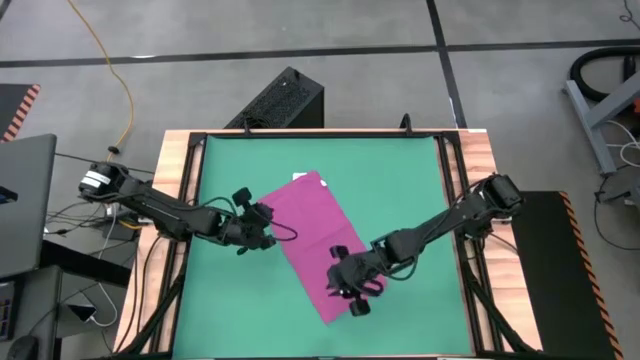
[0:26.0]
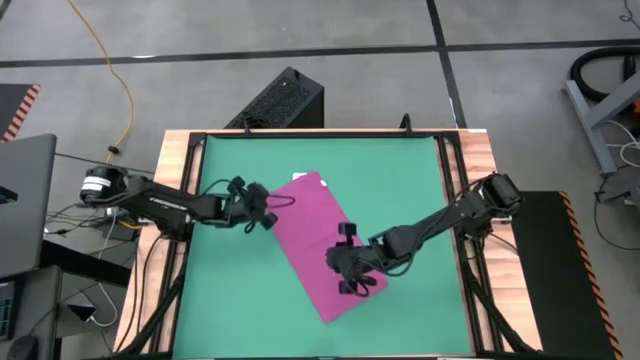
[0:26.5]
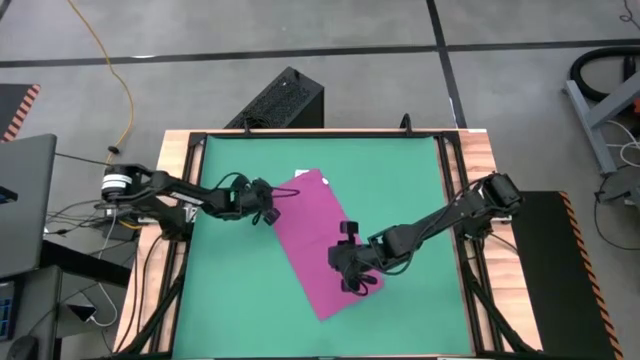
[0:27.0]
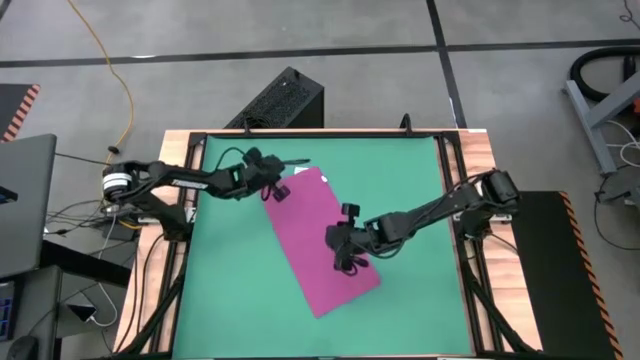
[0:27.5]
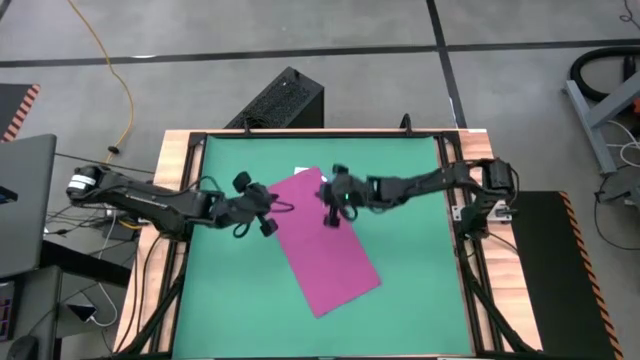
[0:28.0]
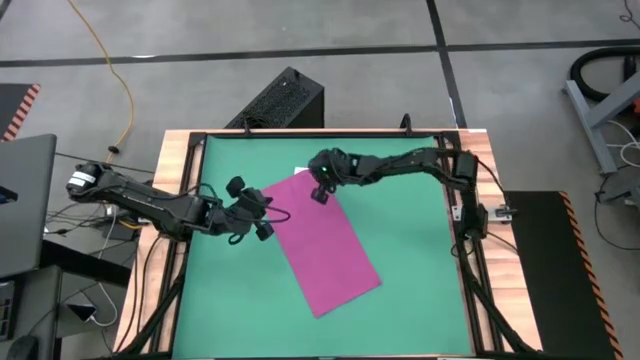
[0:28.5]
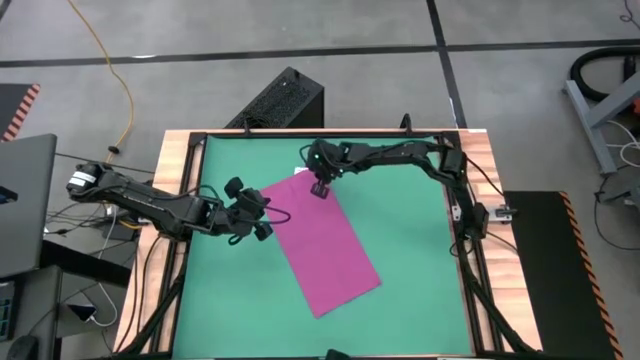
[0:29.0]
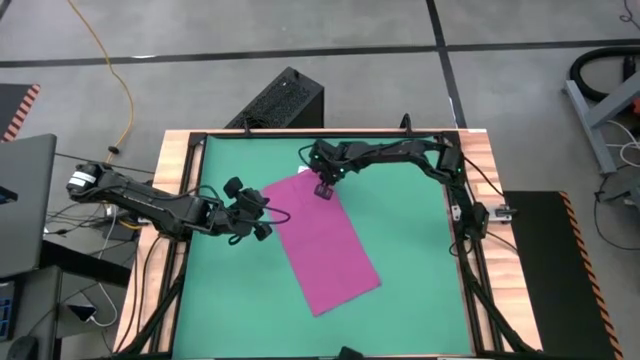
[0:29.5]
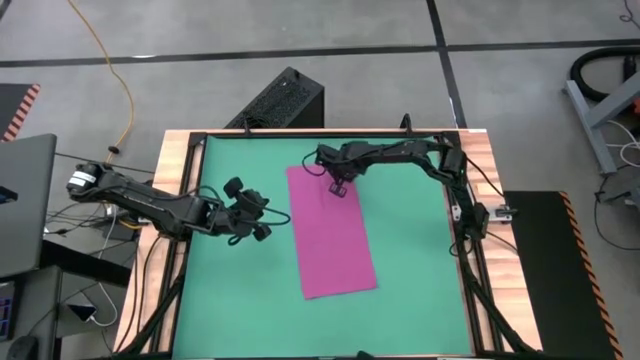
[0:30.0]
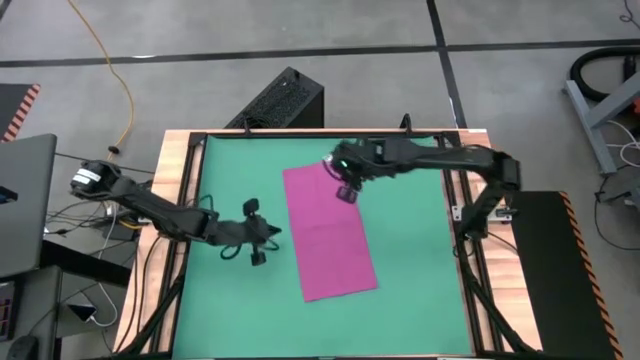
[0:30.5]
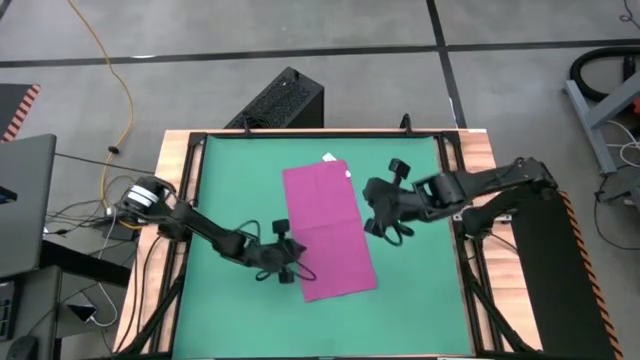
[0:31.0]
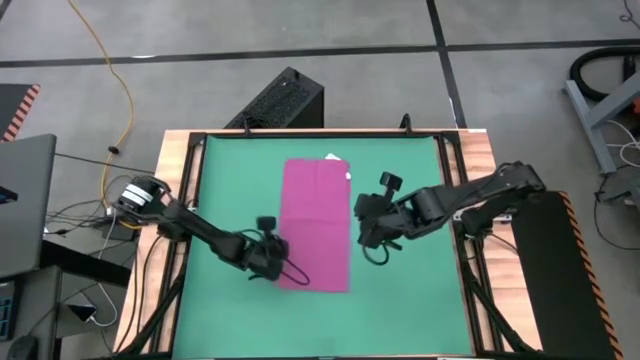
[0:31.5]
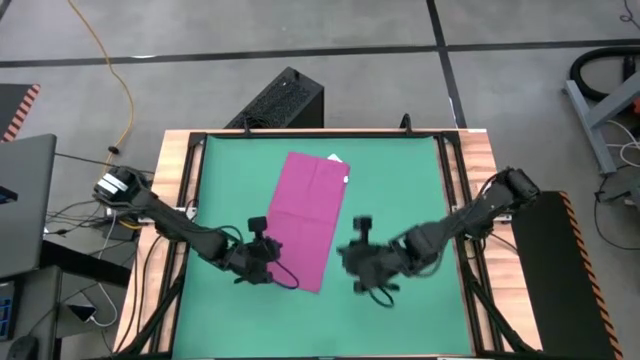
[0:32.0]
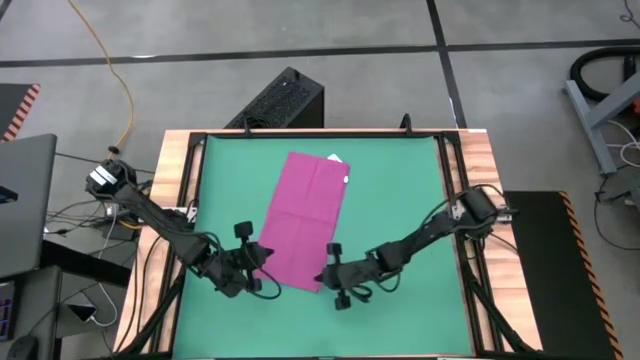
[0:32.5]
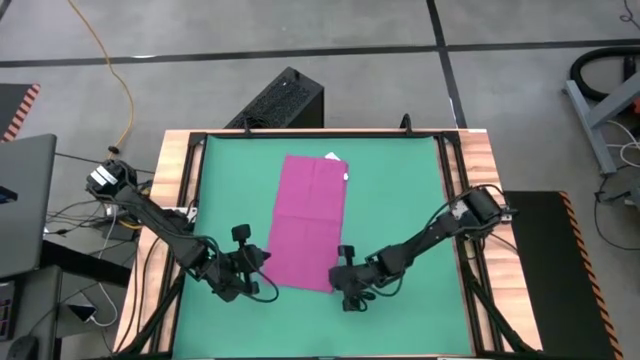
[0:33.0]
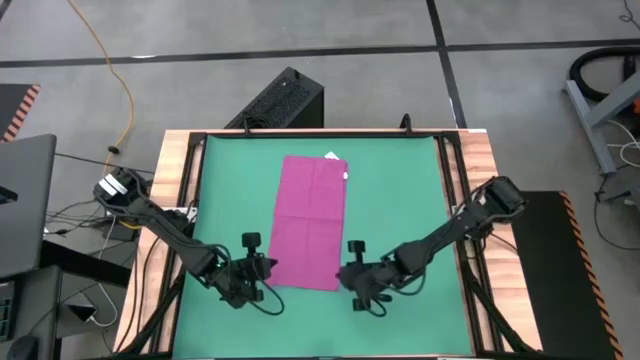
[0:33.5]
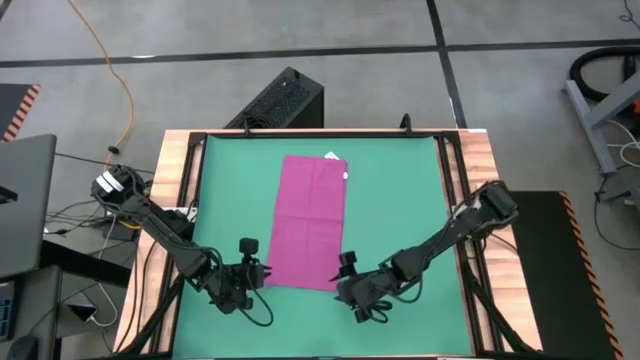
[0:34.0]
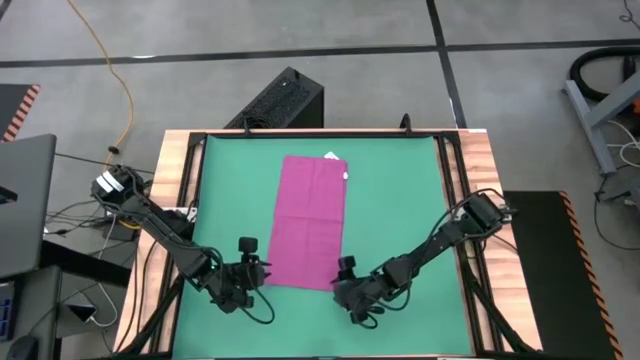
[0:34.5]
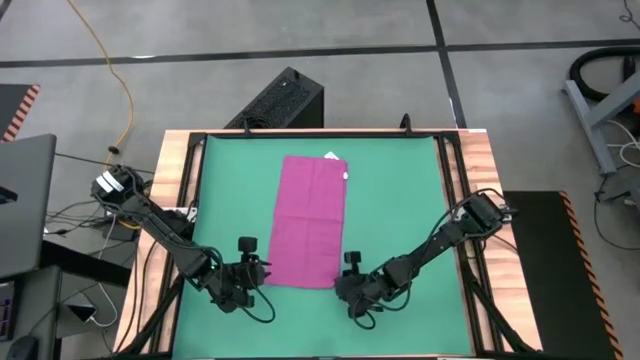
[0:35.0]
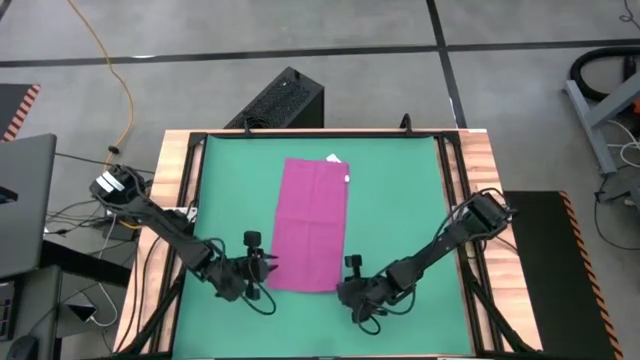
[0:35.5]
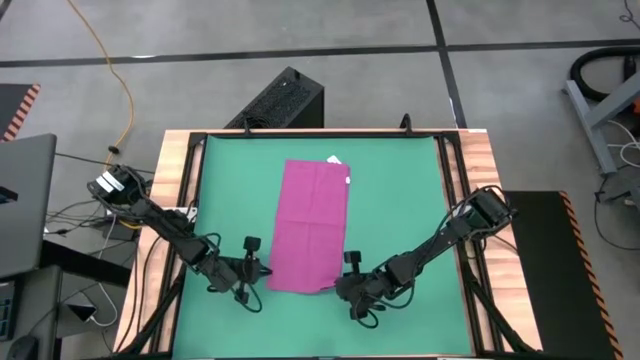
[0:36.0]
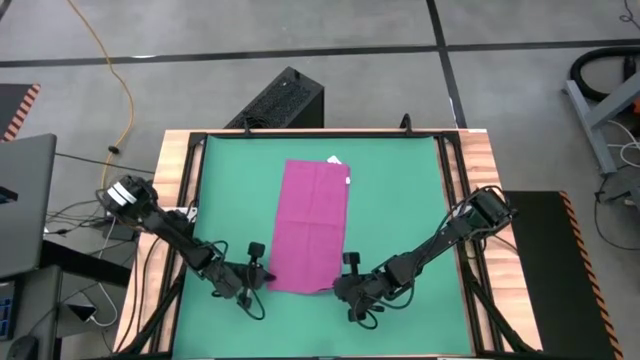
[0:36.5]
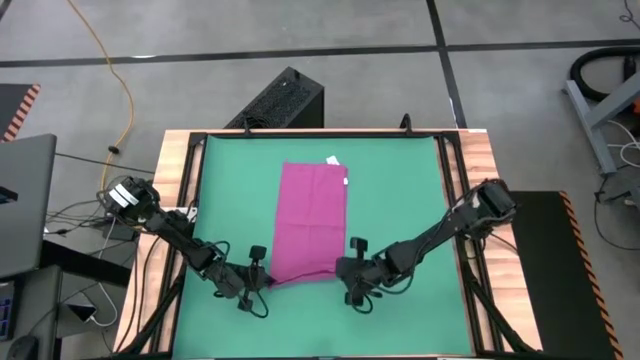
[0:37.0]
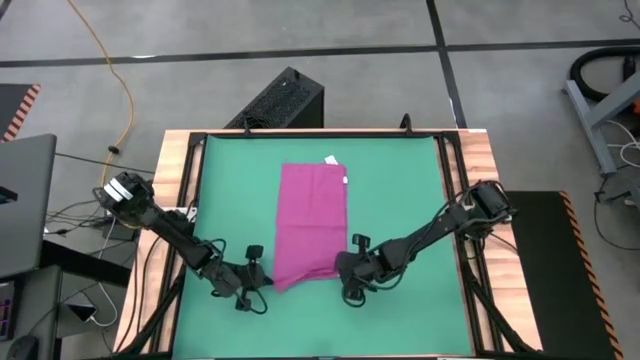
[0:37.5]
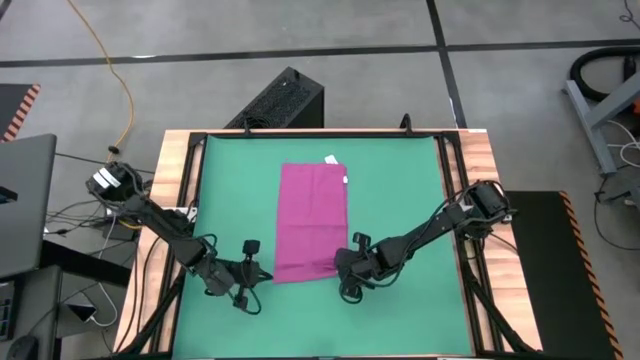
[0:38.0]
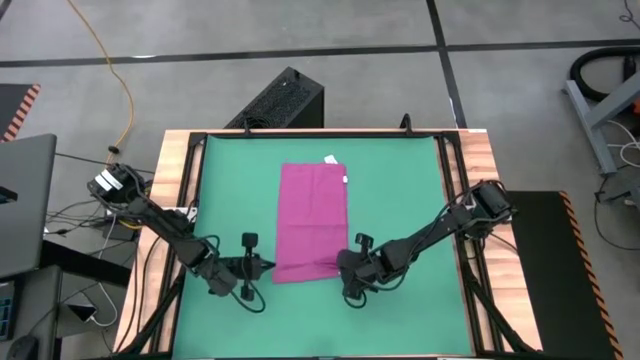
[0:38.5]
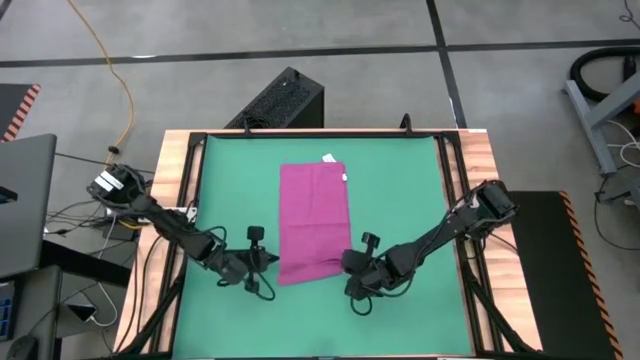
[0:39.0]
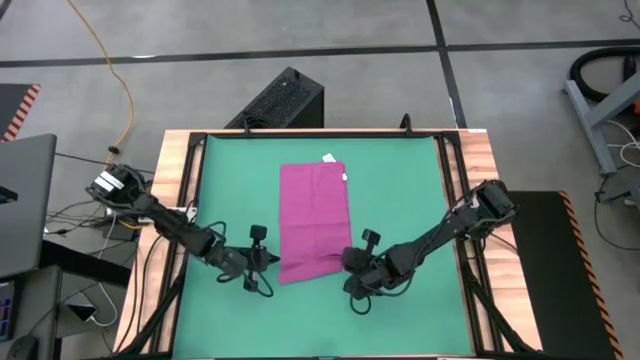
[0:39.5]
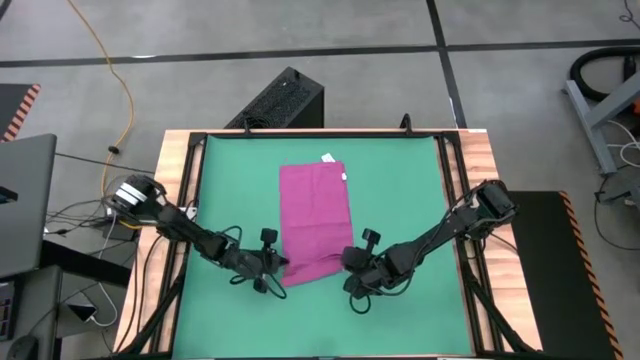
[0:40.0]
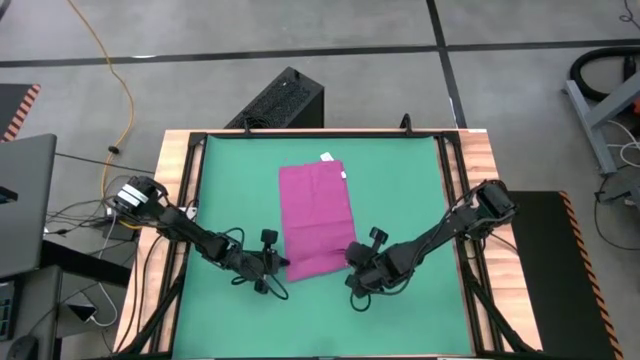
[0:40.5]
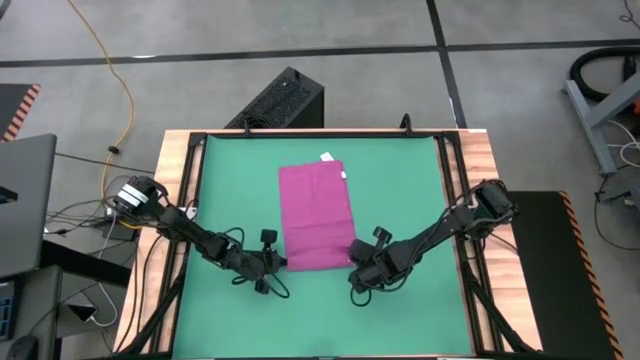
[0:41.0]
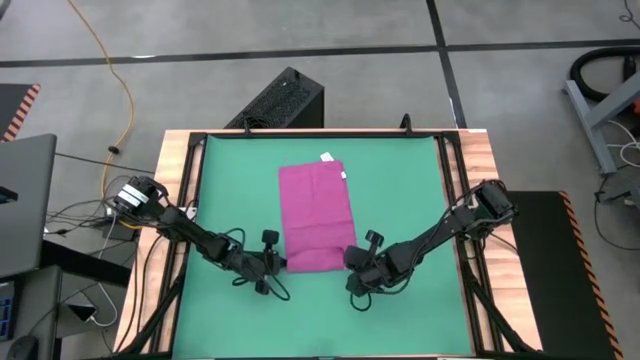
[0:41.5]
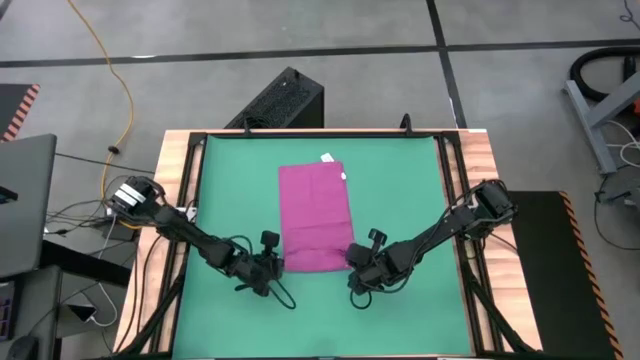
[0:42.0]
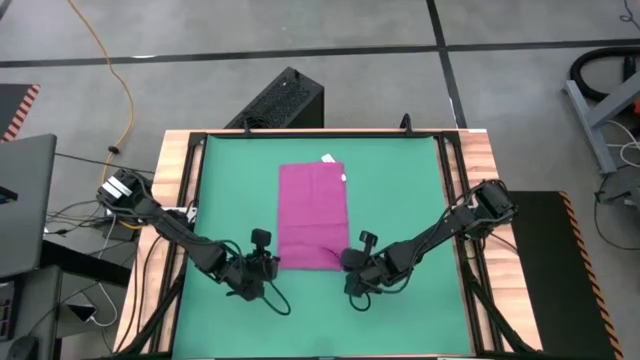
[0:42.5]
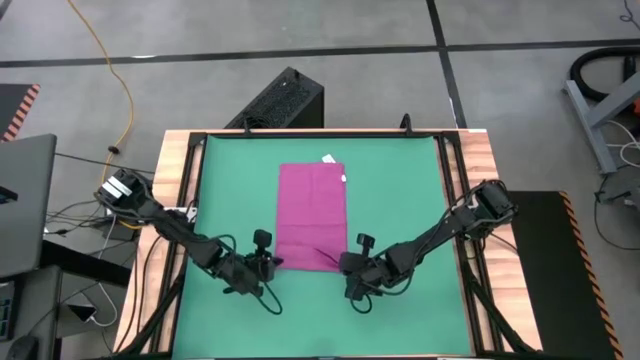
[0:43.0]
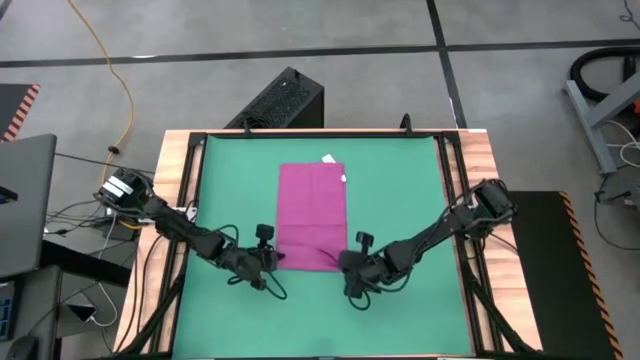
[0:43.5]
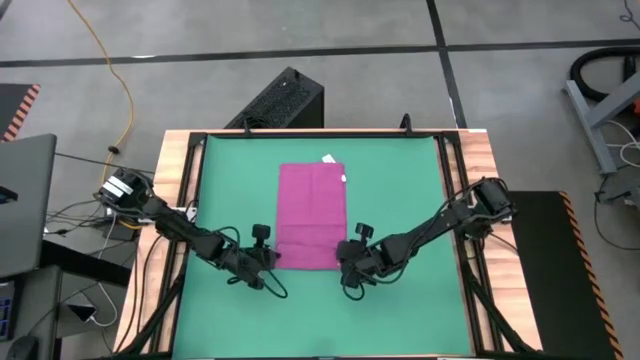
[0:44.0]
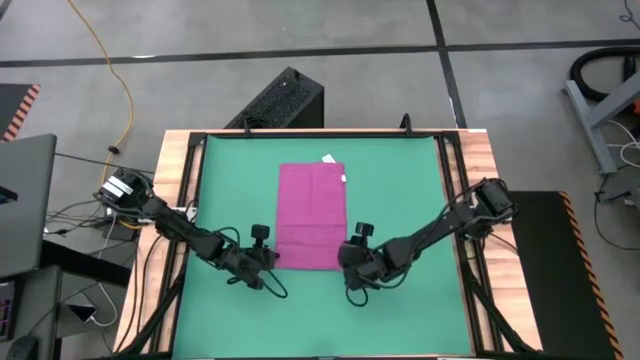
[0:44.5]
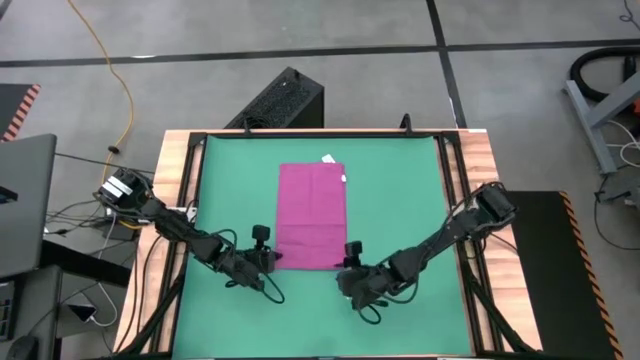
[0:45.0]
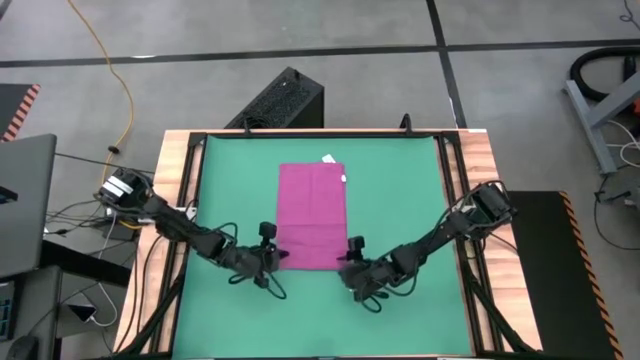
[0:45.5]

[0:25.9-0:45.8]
Task: Roll towel into tight, uniform cylinder
Roll the pink towel
